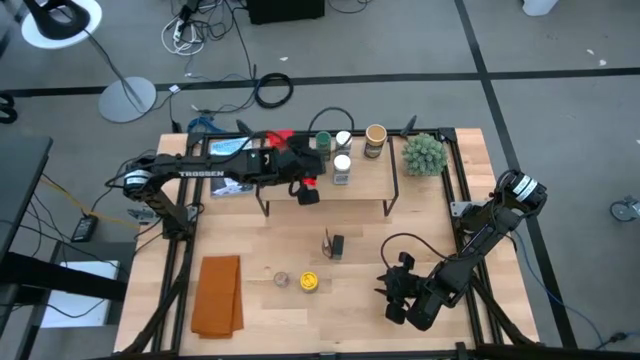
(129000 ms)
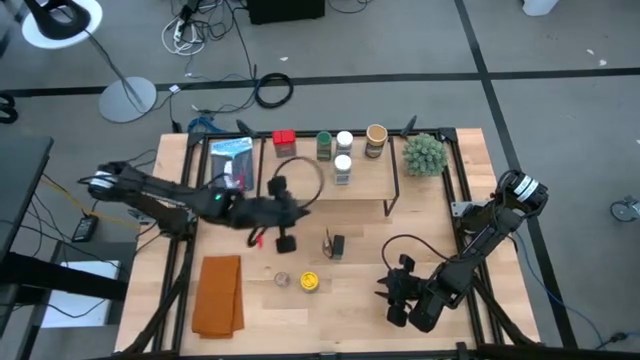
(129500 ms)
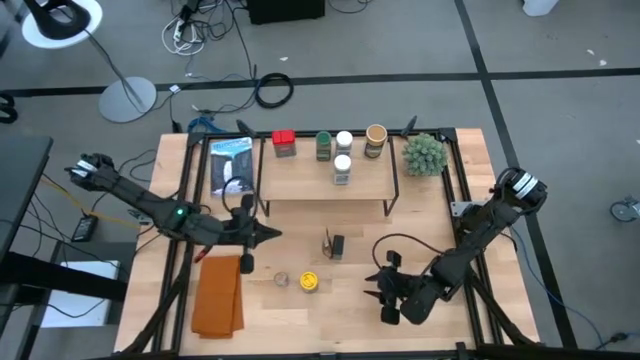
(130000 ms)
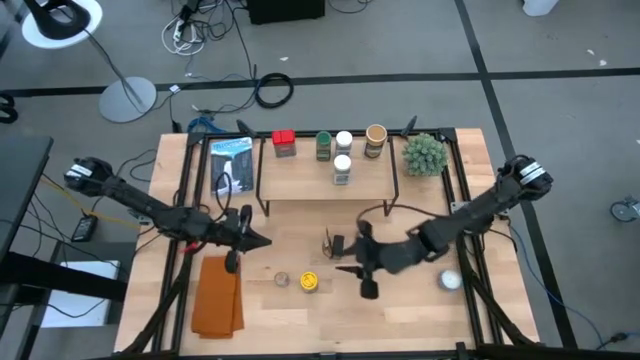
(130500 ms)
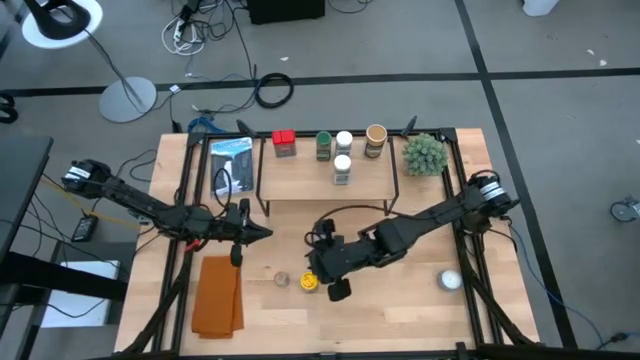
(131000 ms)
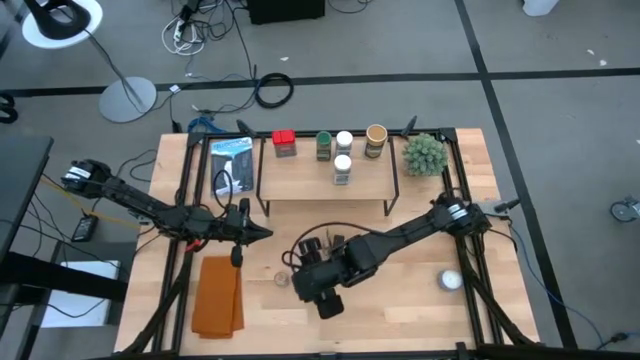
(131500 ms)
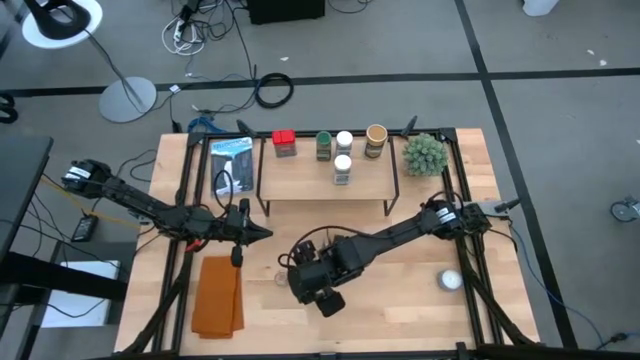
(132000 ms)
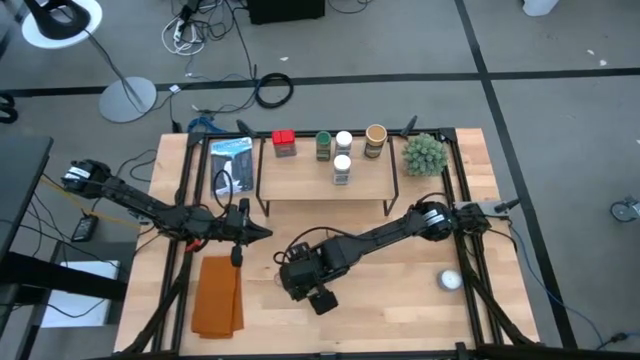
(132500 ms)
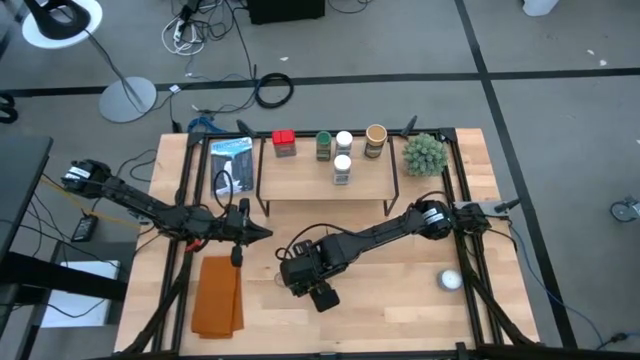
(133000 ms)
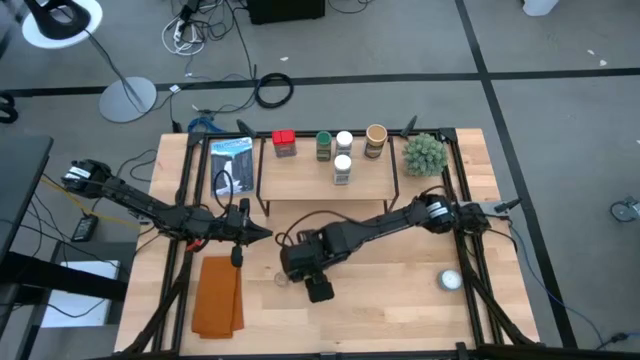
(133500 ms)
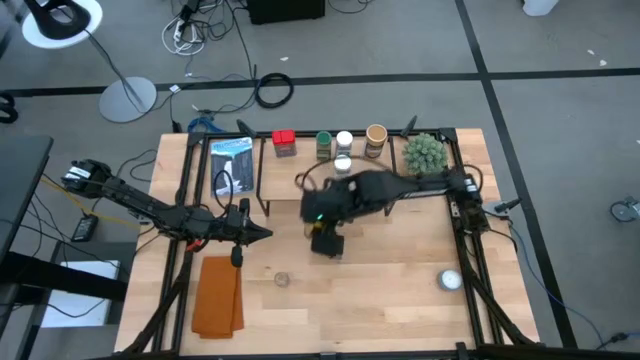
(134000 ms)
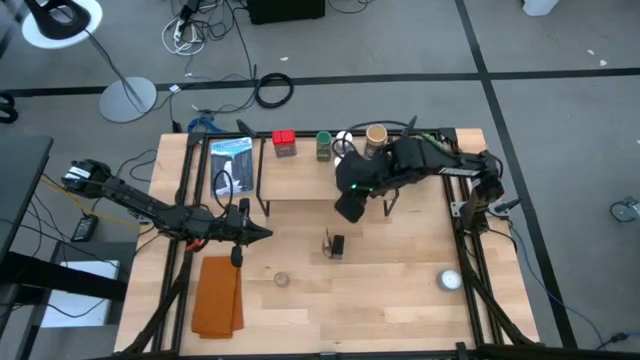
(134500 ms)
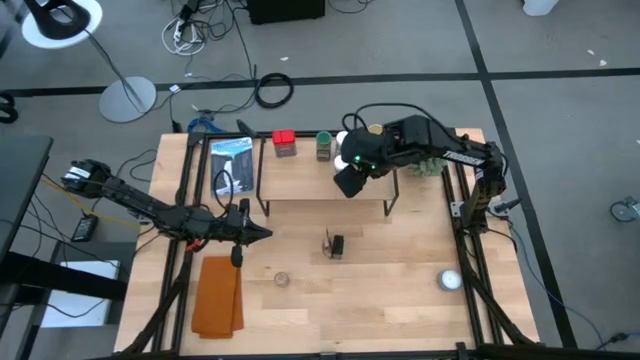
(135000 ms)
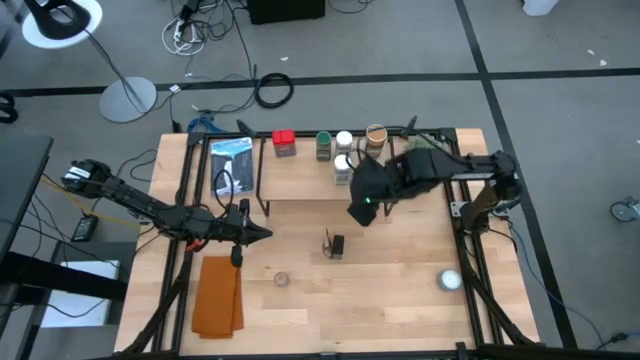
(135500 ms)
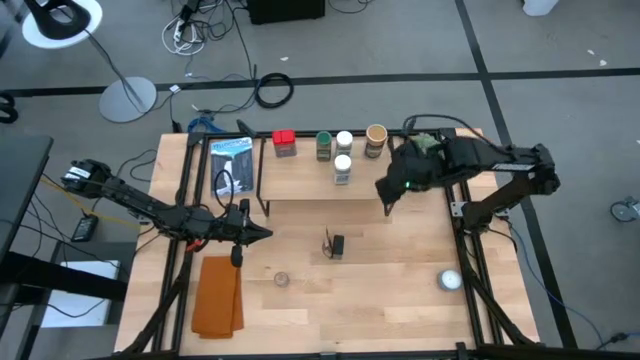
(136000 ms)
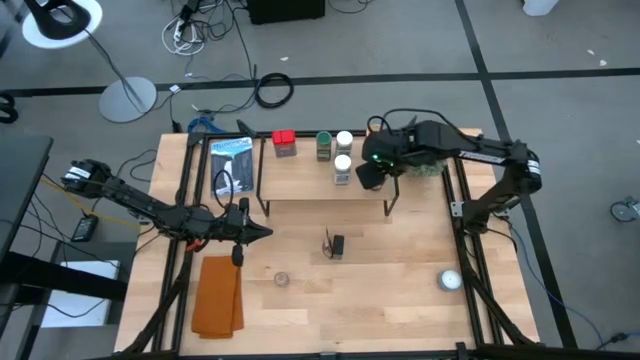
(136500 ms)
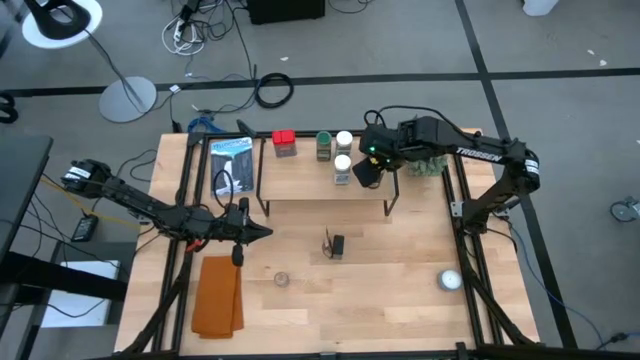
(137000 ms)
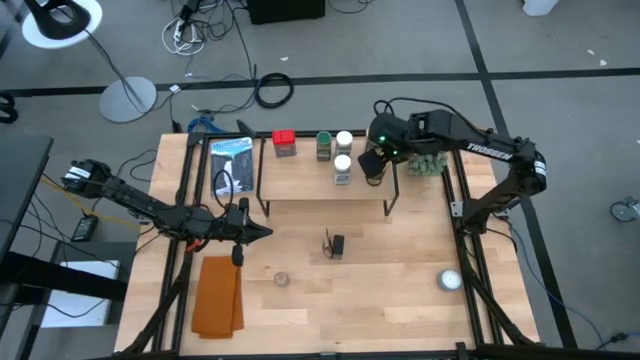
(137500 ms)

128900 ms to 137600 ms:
Task: Shelf spices
Put the yellow seasoning bottle on the shelf

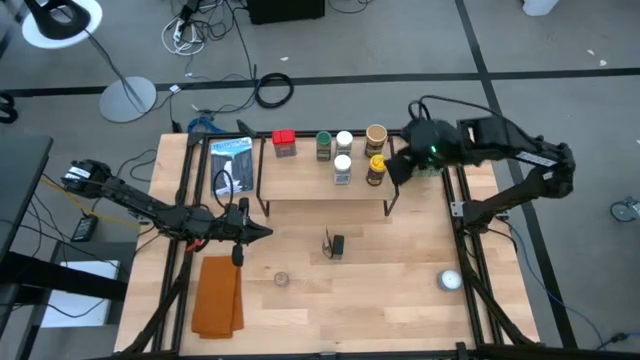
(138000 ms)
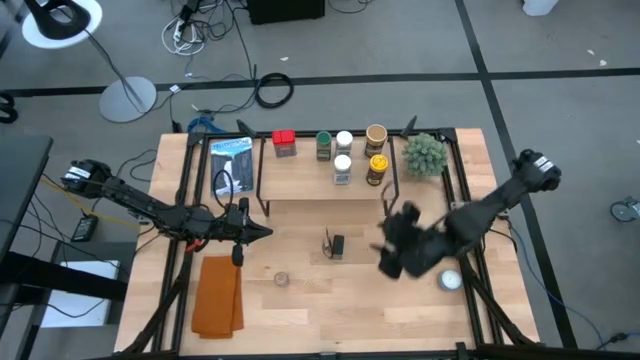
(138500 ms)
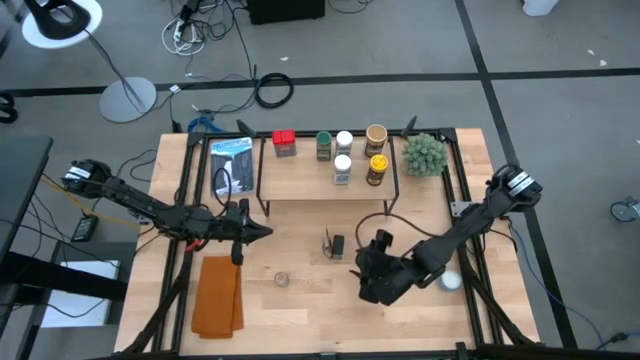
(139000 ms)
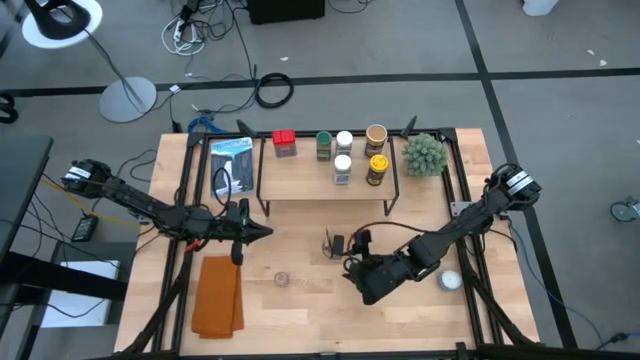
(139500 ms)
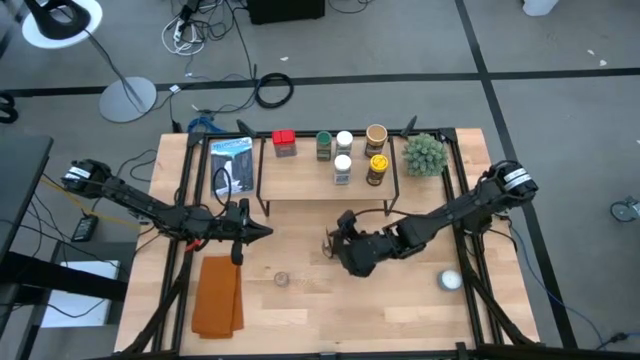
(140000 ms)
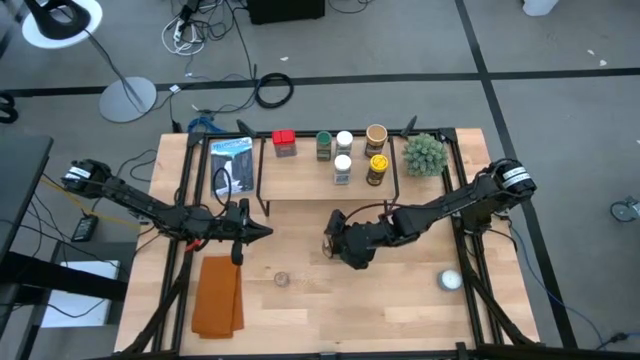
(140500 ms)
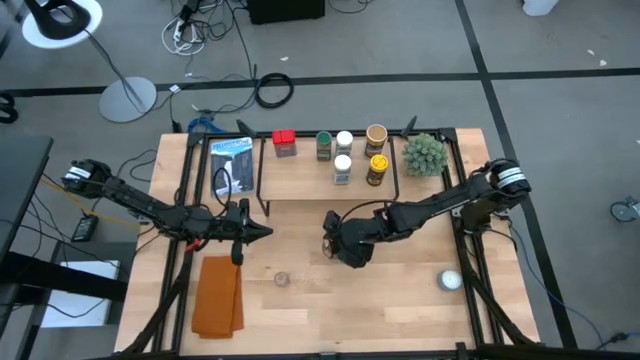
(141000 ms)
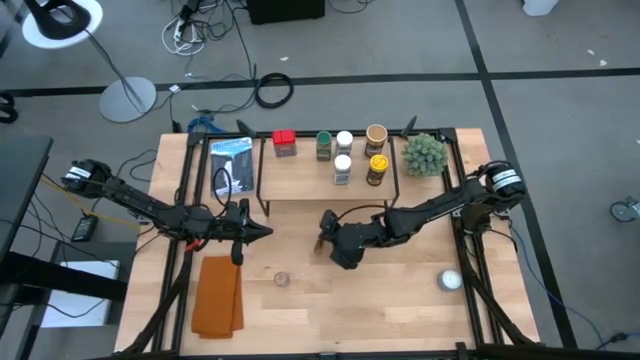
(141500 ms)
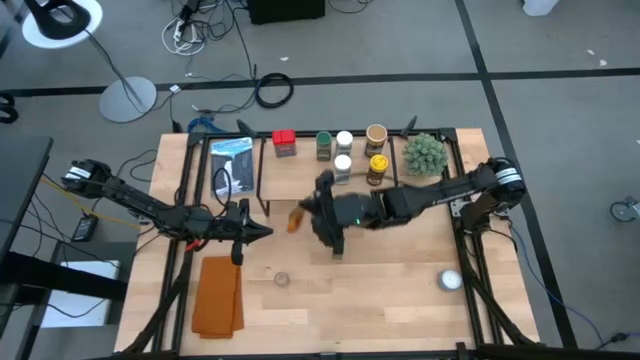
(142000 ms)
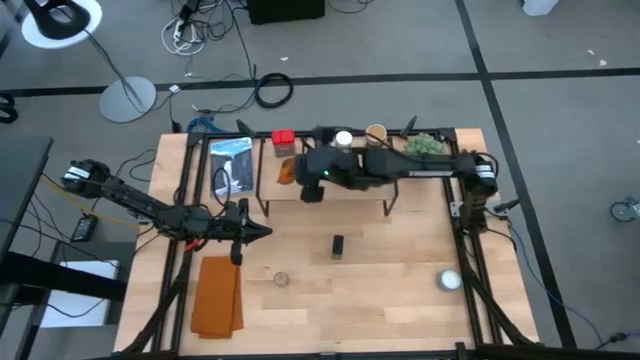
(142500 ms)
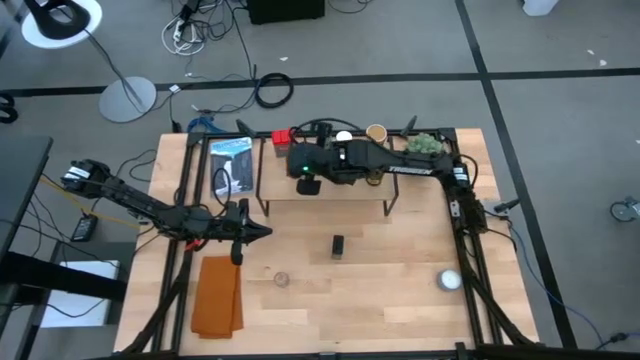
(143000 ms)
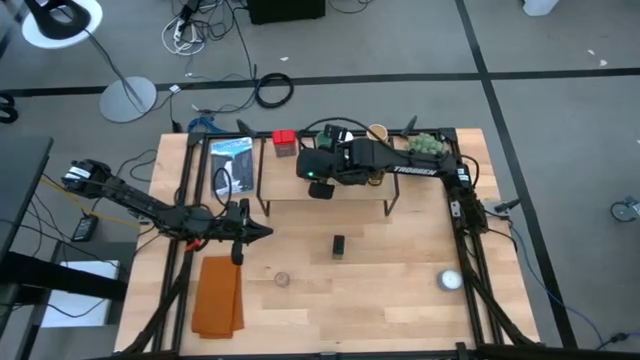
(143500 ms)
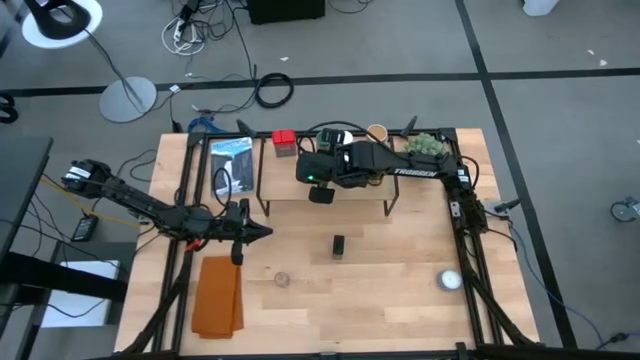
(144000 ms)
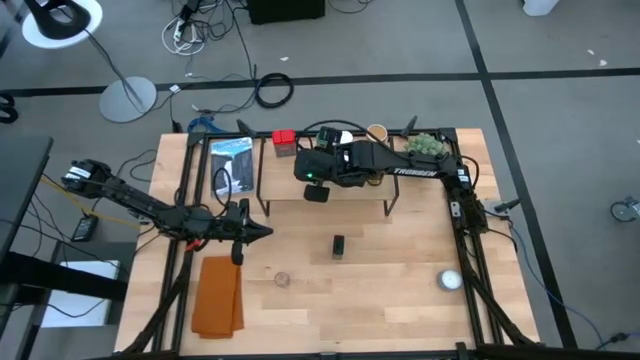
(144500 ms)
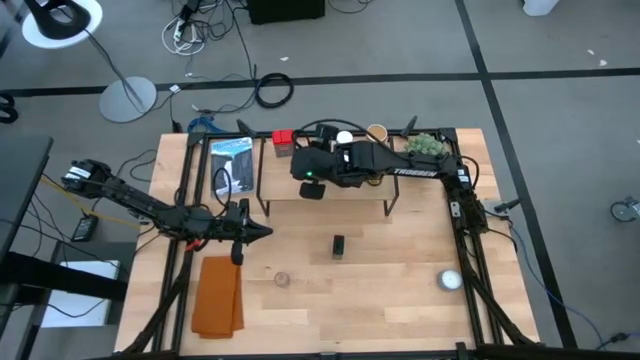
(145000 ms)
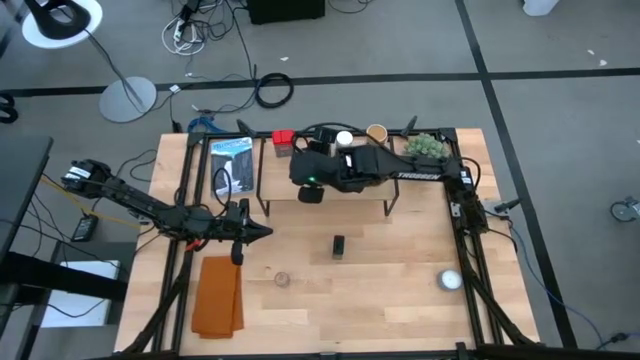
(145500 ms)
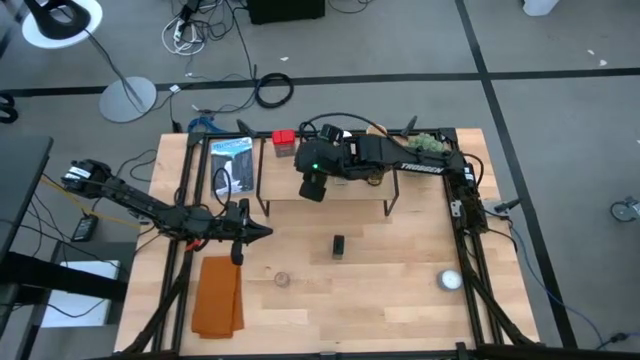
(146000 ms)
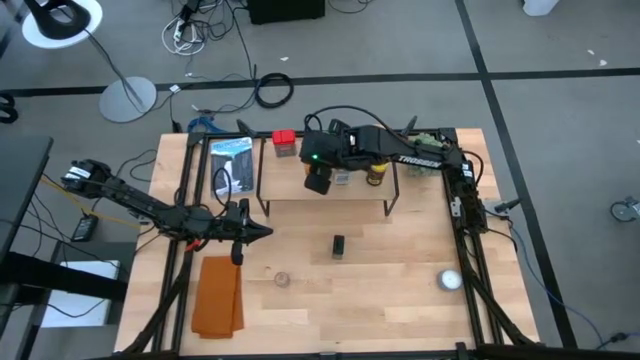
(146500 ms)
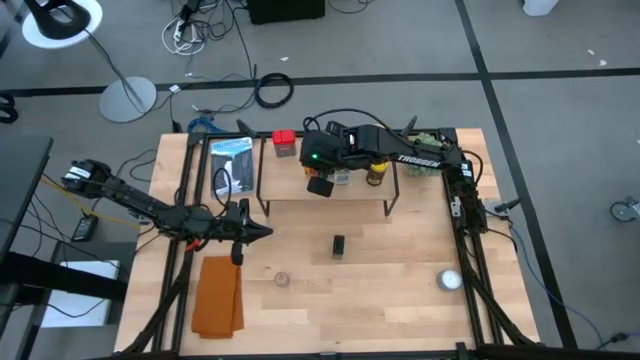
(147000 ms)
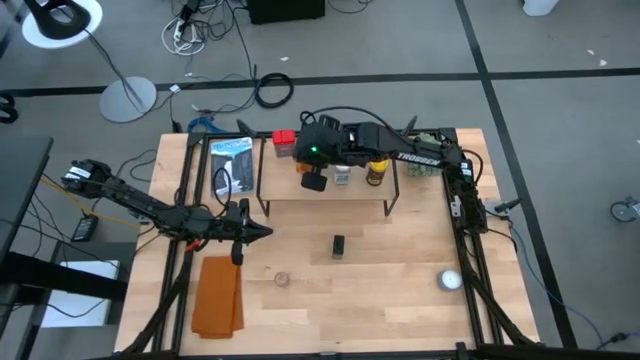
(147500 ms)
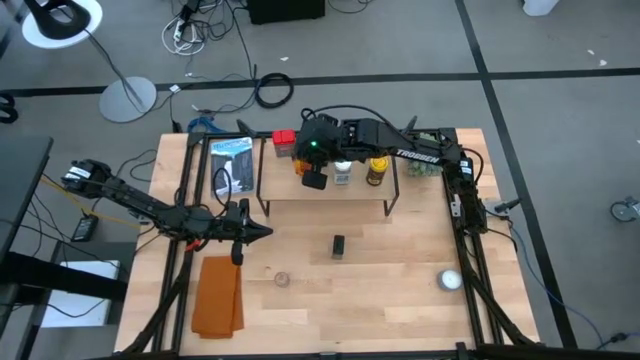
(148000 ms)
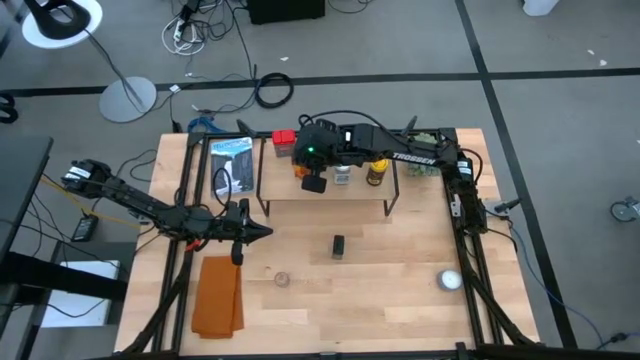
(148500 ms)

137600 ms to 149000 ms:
Put the orange seasoning bag on the shelf

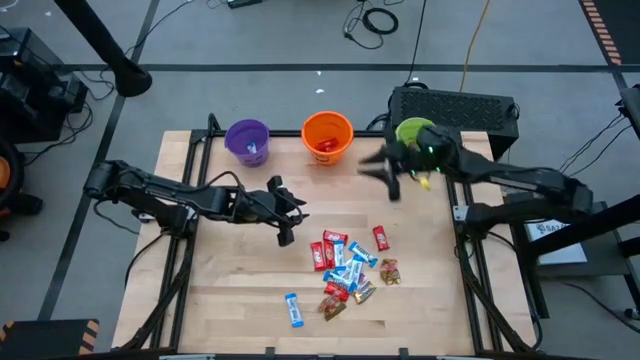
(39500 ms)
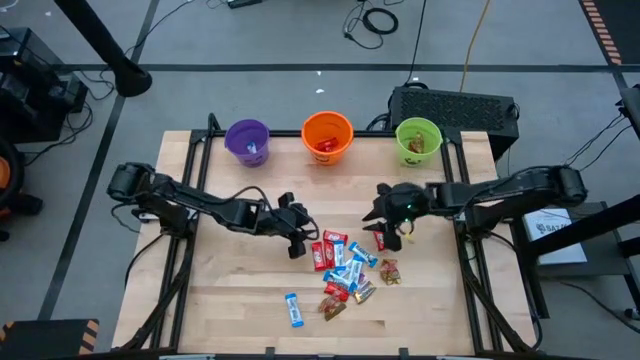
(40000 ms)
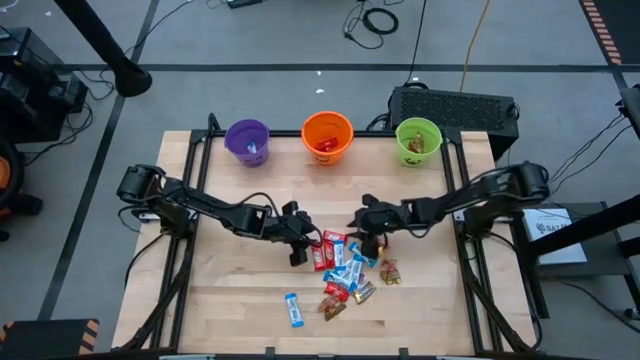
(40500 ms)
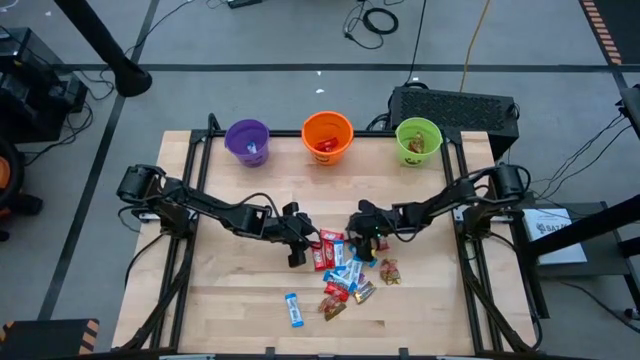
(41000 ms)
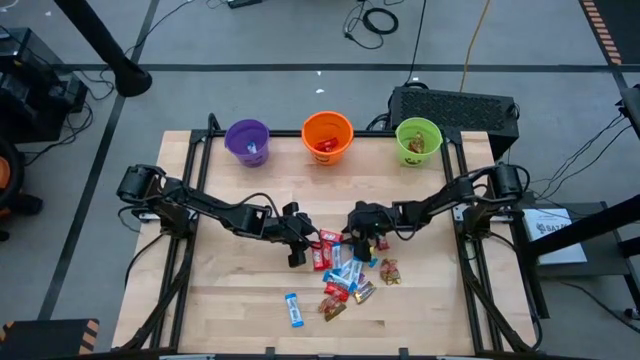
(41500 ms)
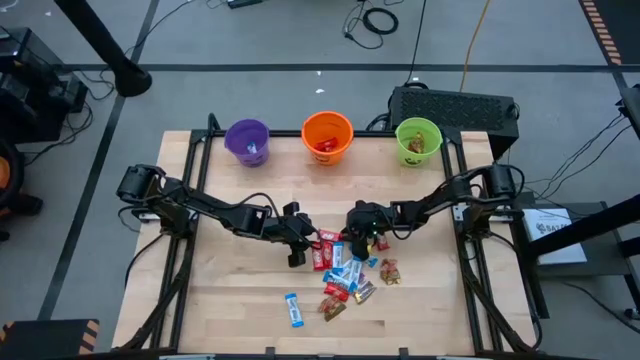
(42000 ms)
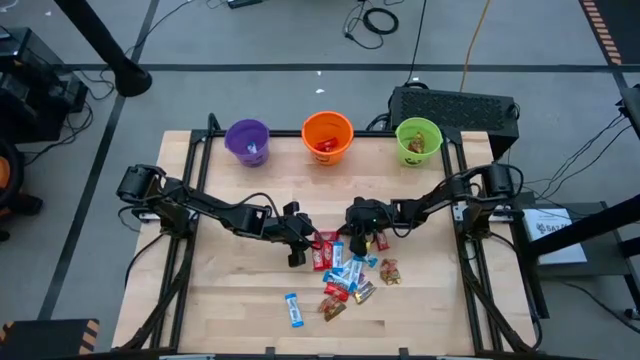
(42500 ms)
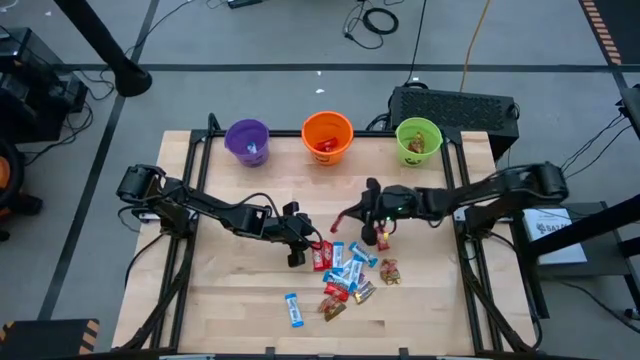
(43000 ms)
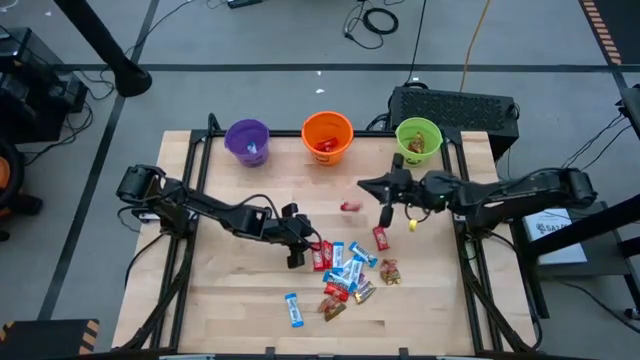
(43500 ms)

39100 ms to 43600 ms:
Task: Sort candy by brand, put in halloween buckets
Put the red chocolate into the orange bucket
